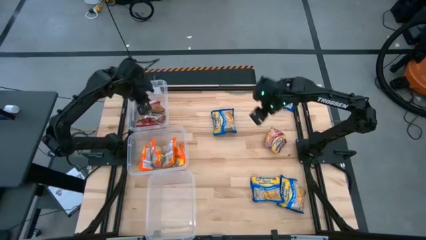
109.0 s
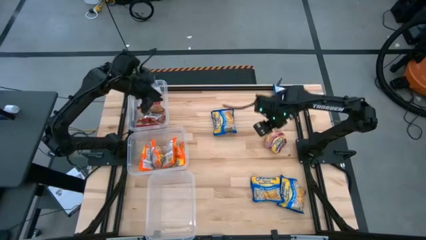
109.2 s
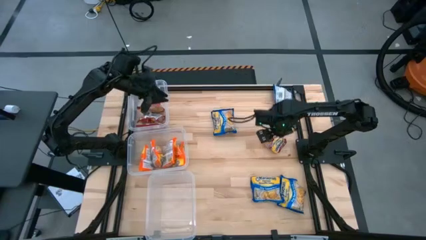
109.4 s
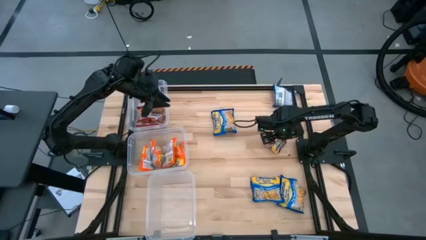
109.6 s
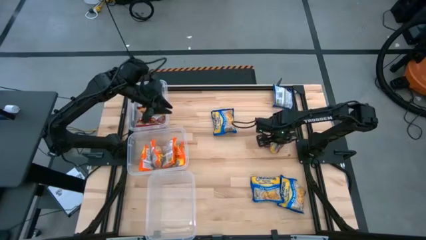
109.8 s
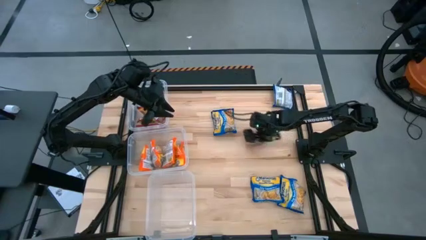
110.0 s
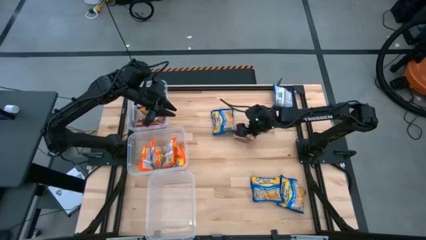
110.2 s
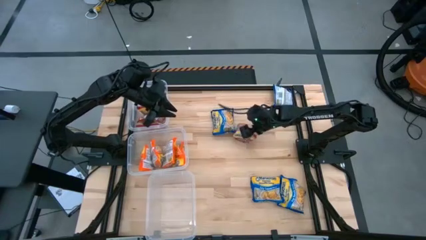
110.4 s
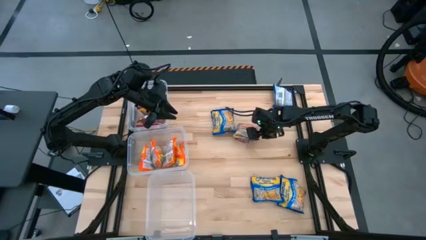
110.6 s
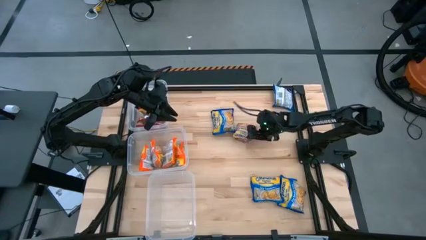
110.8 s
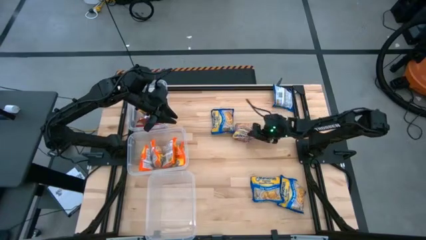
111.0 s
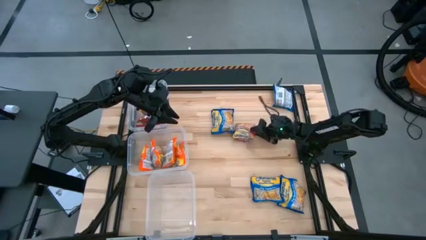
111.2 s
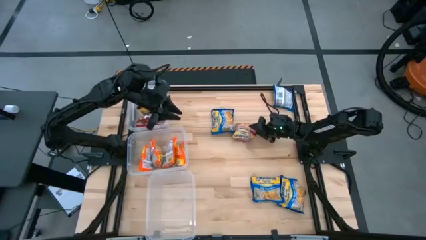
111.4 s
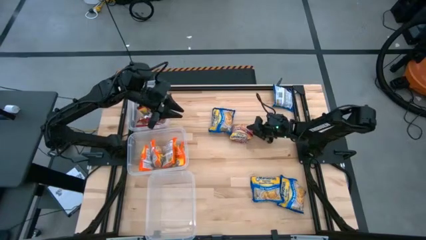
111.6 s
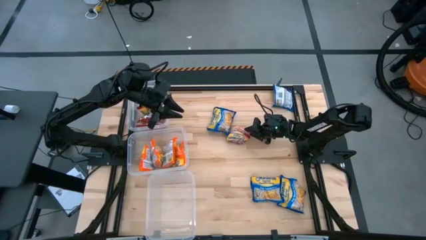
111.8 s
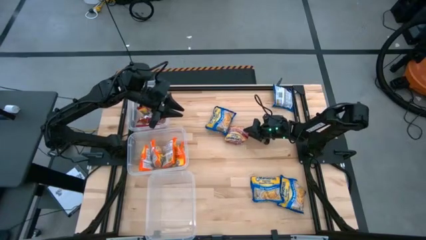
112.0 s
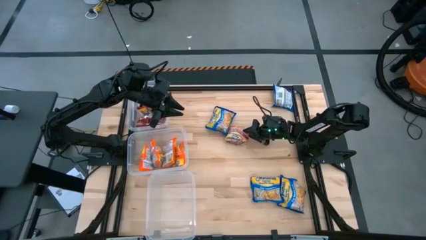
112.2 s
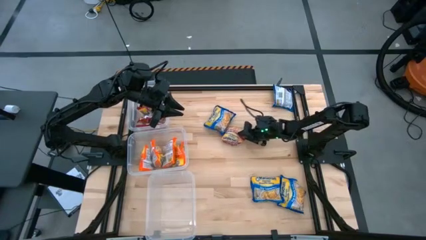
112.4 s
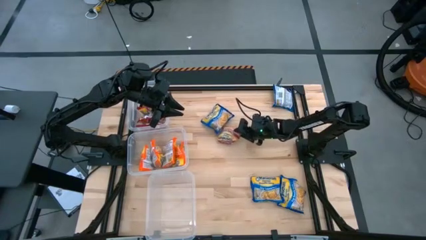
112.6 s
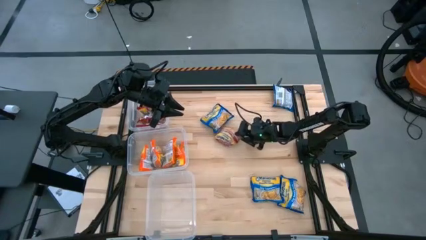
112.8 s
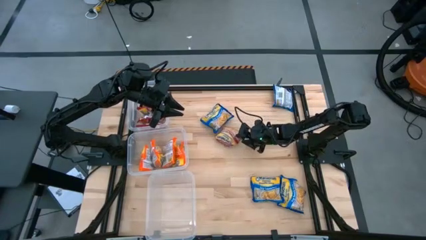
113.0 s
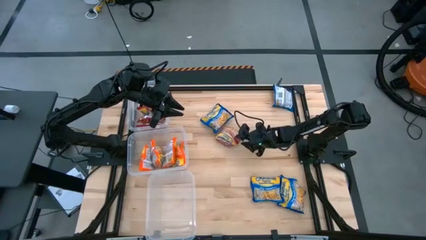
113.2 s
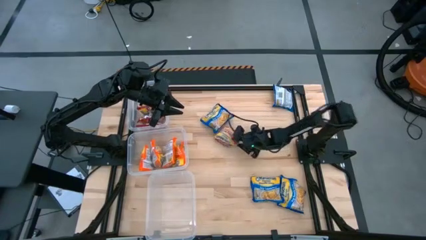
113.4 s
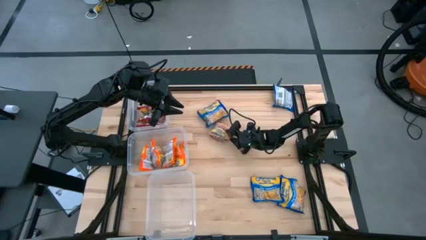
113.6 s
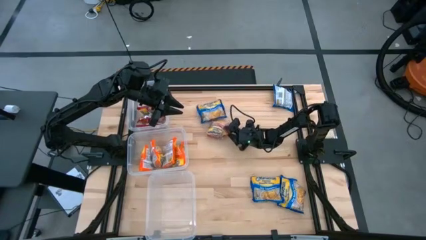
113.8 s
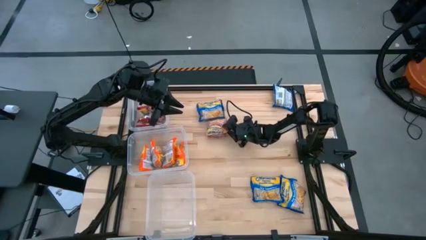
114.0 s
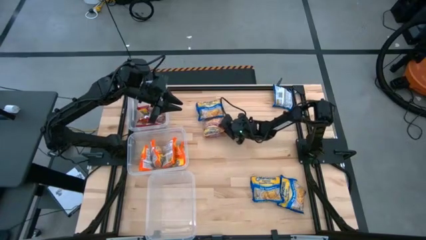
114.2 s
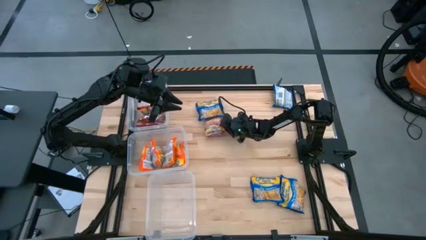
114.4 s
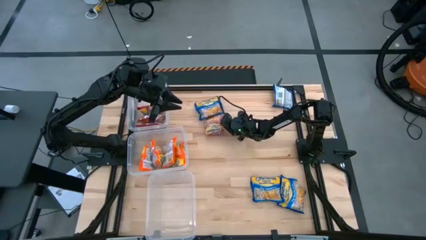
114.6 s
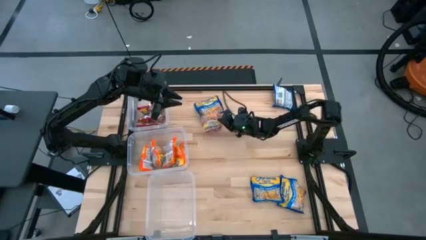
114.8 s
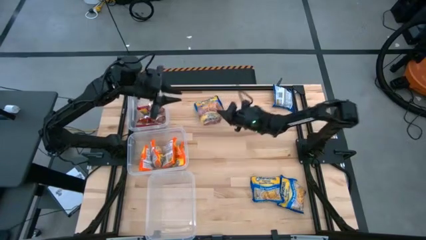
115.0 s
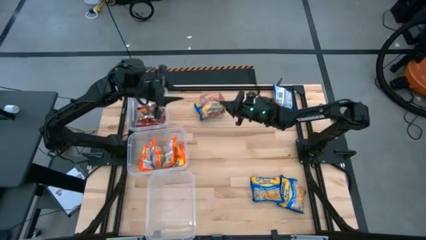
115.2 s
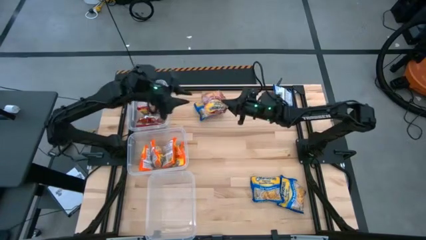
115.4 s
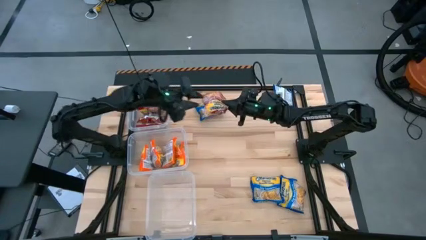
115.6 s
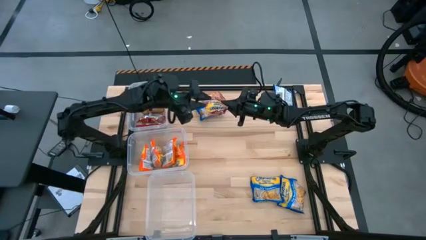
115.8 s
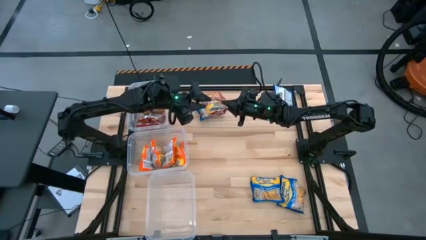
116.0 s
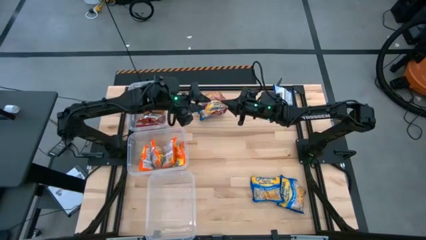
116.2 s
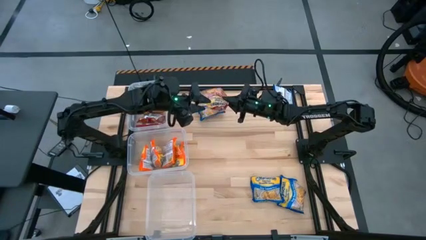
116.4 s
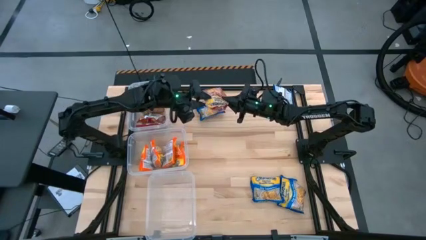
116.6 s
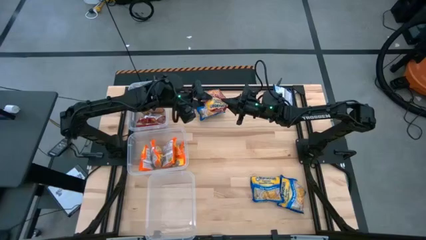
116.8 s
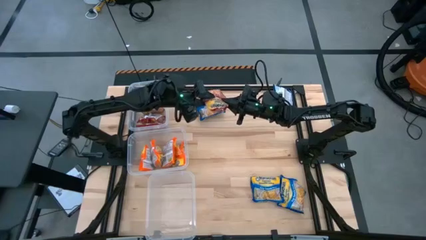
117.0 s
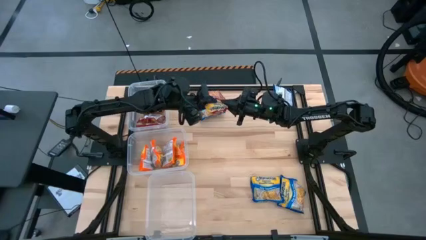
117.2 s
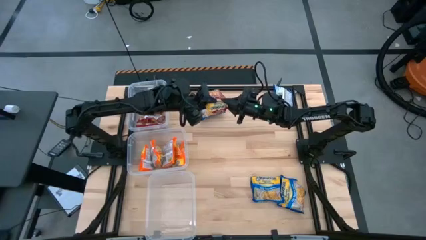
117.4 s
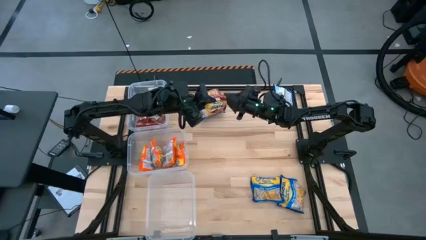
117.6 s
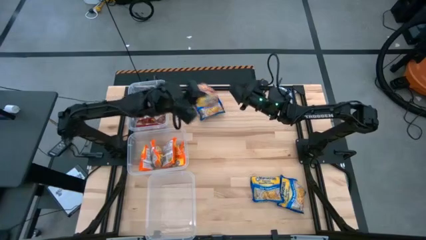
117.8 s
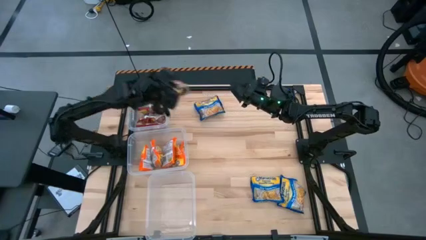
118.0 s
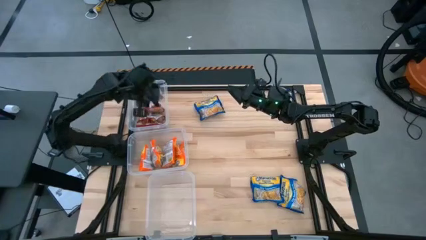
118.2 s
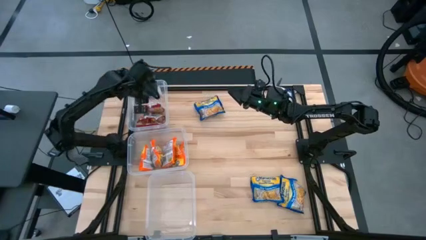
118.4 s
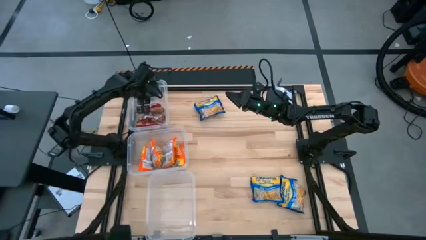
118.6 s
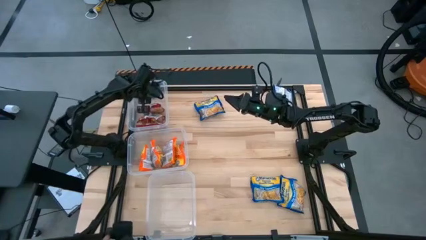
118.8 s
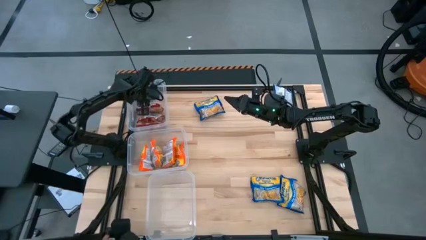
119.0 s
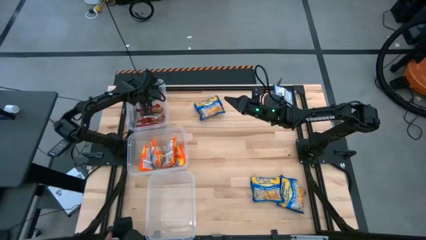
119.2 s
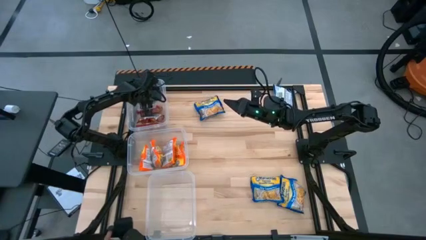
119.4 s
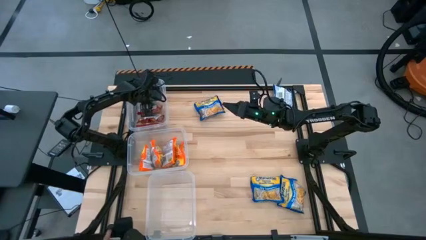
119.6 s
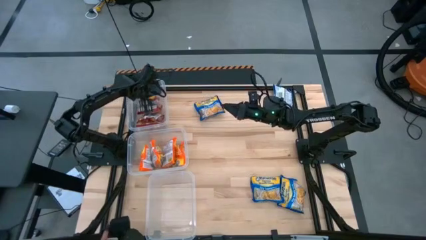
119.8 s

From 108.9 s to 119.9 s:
Task: Sort Maruchan noodles
Put the red noodle pack into the top transparent bin

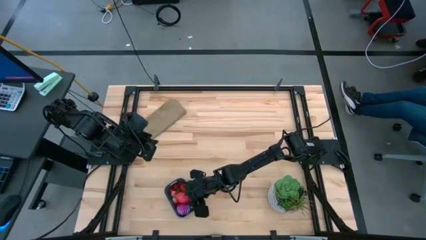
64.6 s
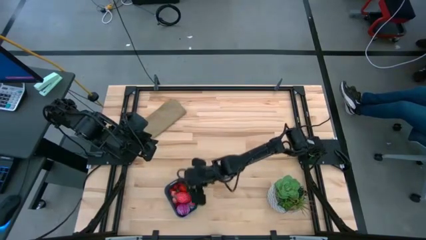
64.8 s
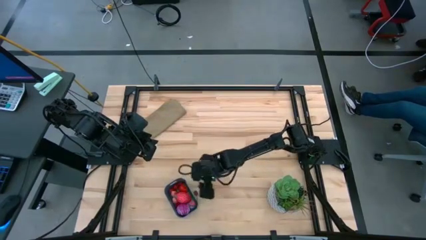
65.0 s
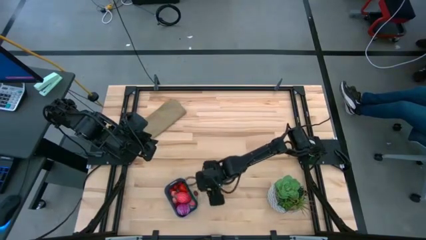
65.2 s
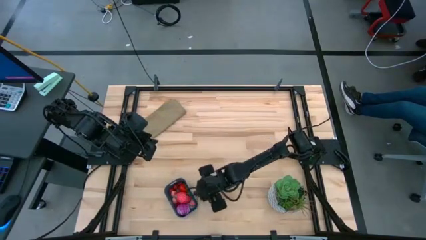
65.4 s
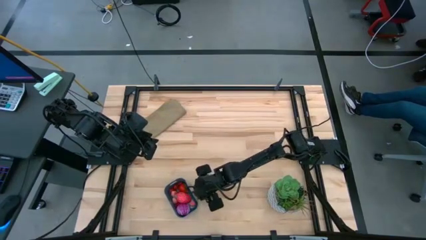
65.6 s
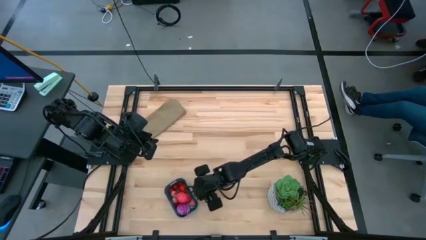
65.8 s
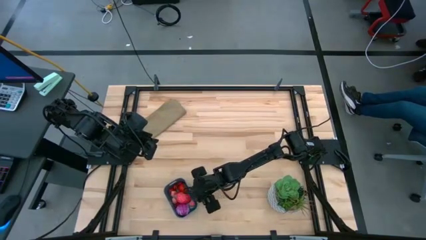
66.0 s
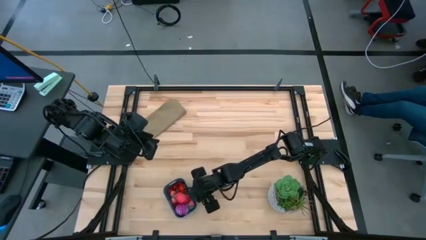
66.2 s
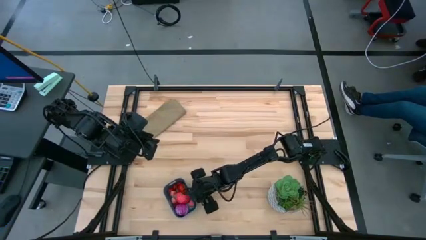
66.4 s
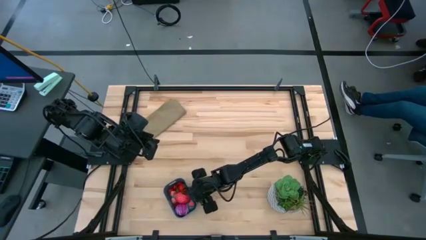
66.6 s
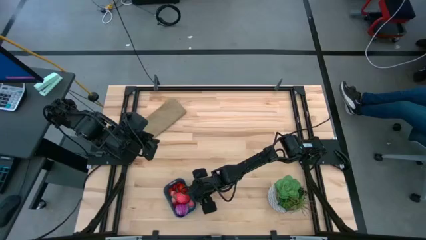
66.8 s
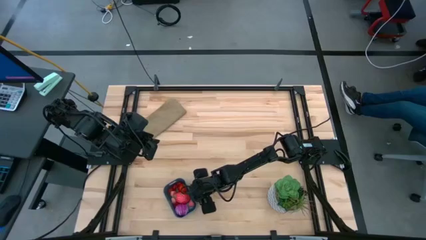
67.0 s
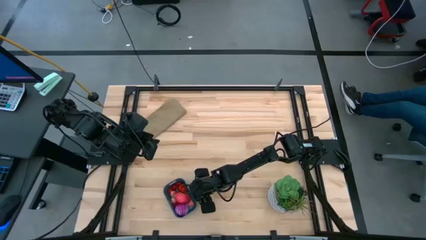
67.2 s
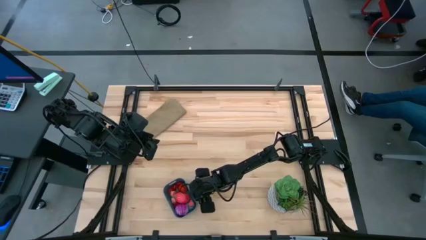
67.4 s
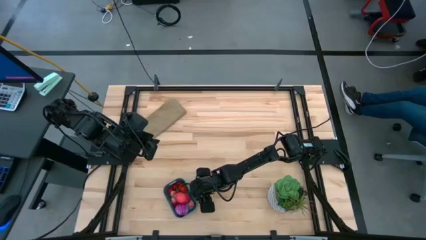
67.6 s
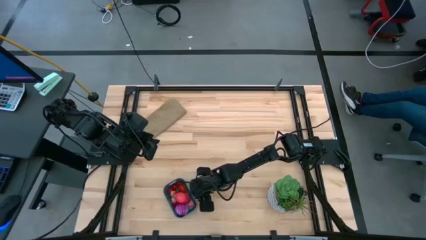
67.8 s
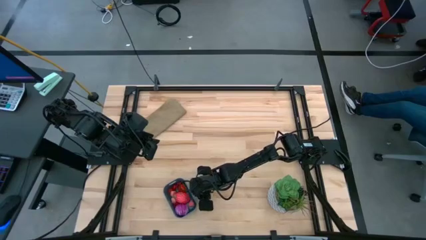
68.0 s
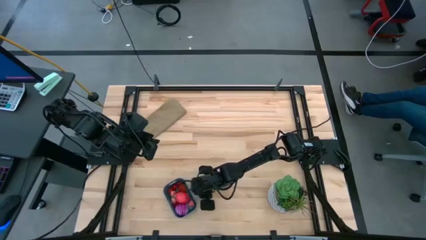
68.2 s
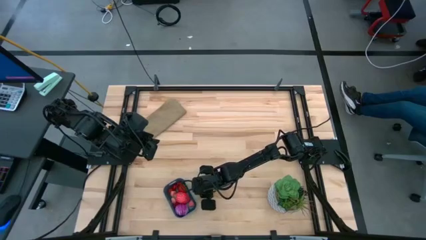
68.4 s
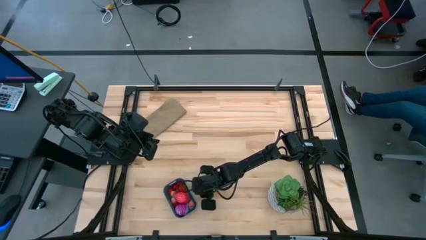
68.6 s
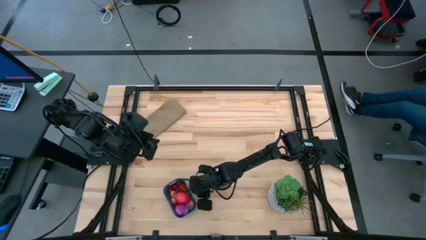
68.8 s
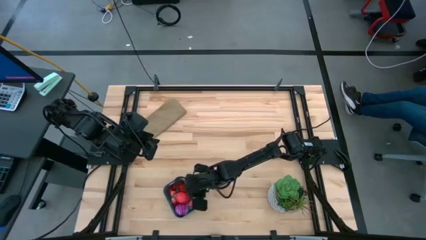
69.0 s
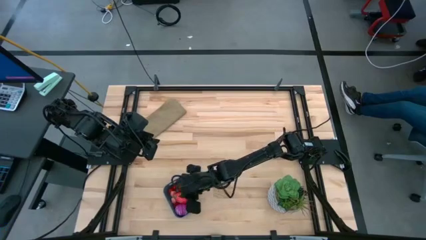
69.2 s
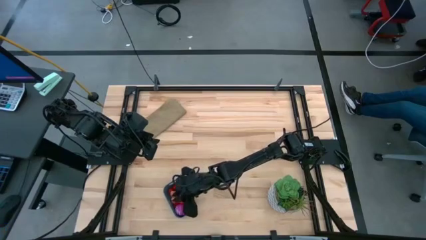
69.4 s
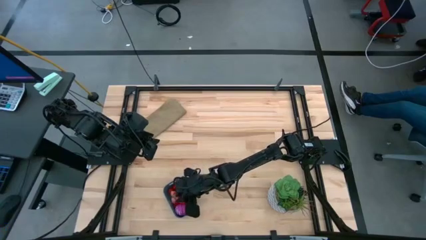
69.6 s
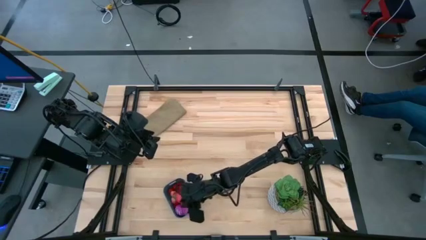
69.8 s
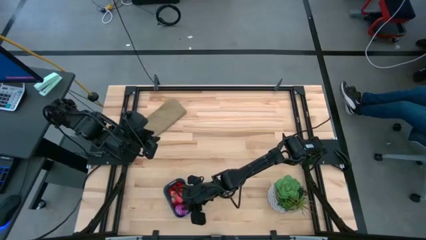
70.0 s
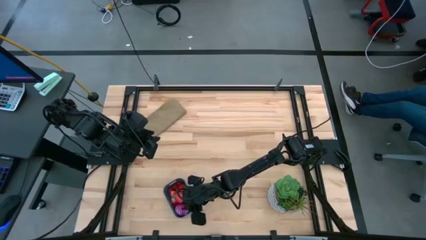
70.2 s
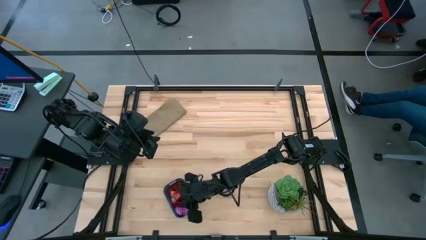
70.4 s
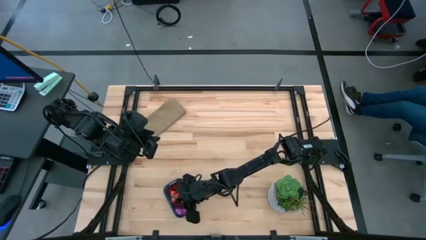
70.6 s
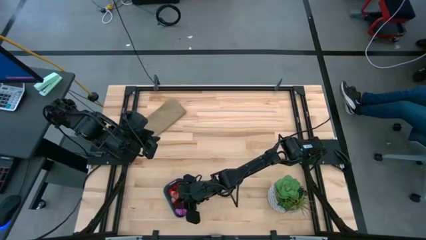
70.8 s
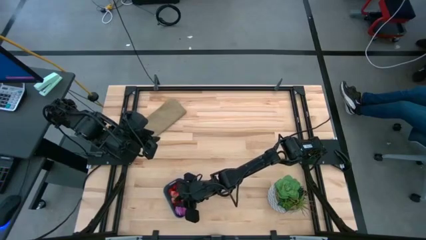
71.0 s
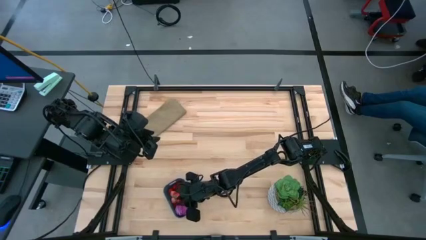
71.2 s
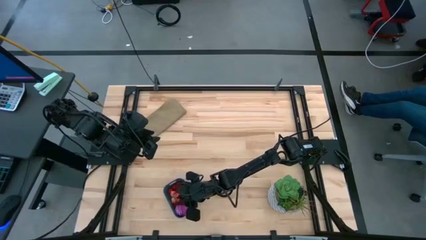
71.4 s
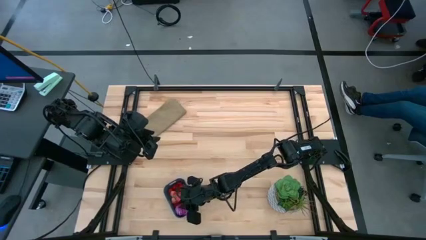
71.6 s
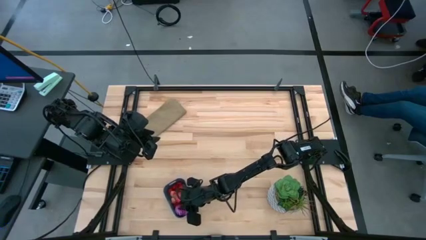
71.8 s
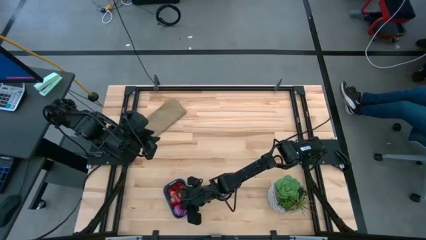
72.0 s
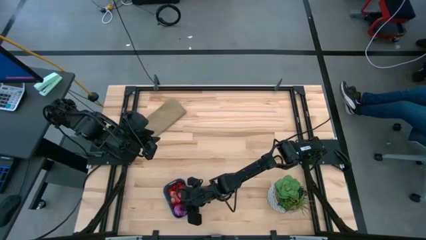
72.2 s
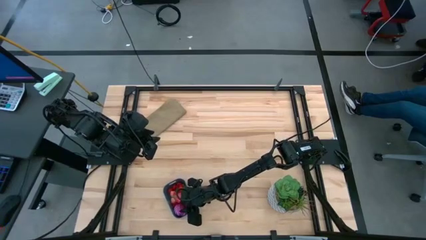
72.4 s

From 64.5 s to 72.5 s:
Task: Pick and placing Produce into tupperware
Put the red cherry into the blue bin
